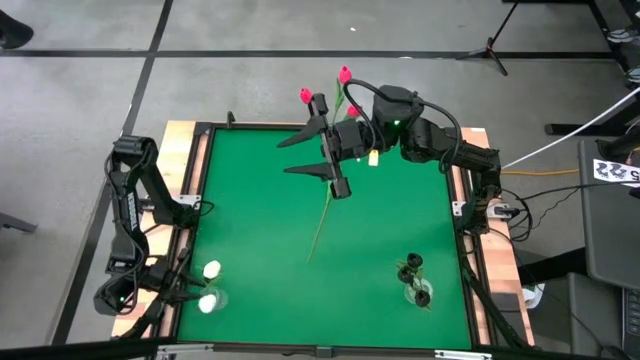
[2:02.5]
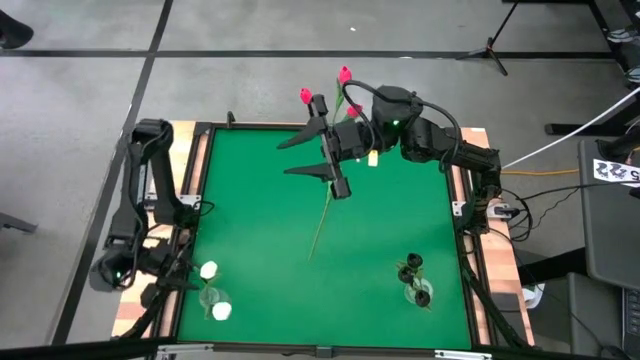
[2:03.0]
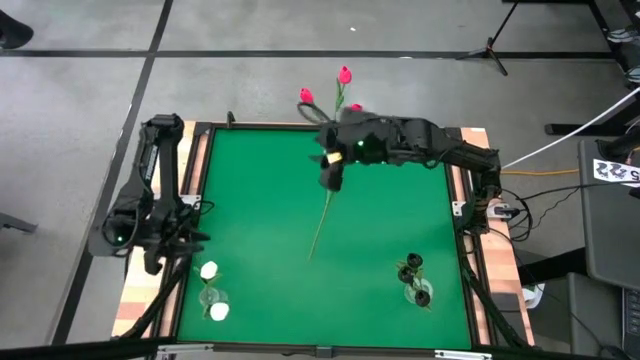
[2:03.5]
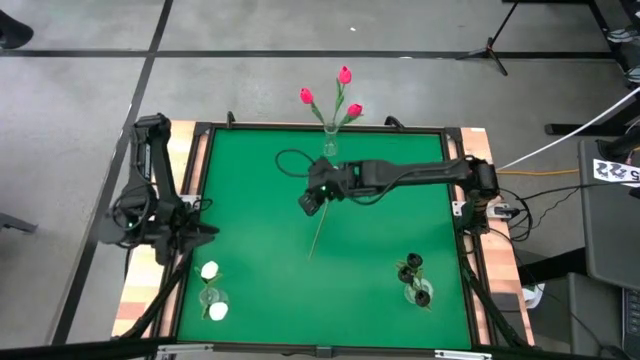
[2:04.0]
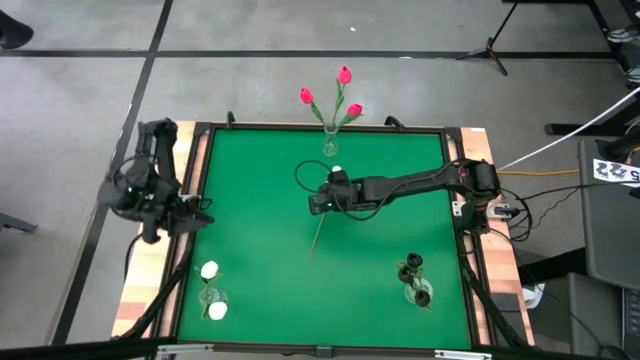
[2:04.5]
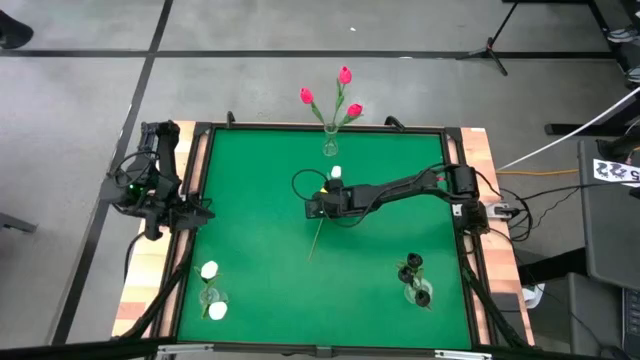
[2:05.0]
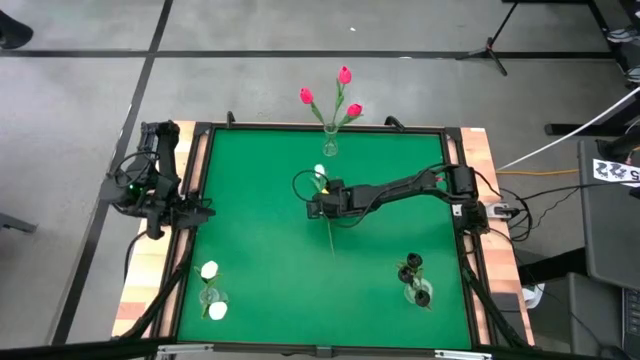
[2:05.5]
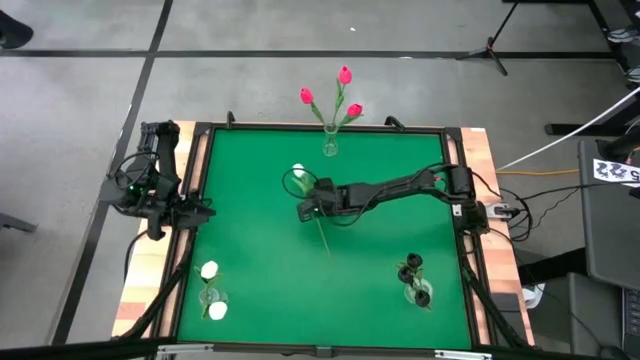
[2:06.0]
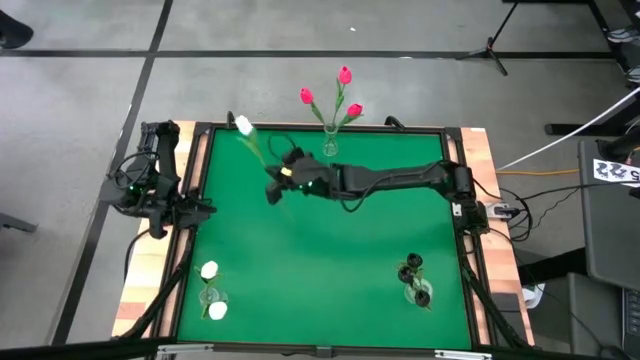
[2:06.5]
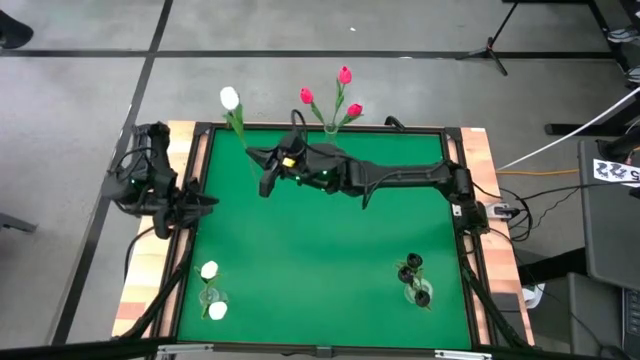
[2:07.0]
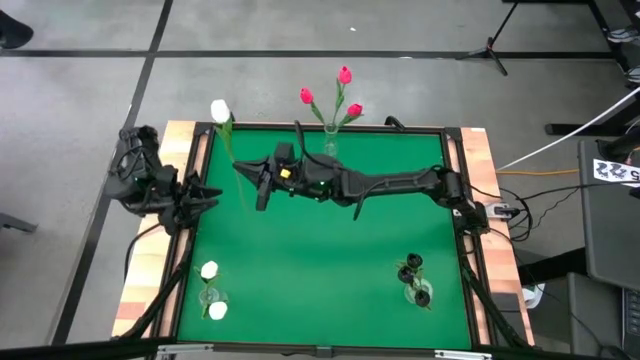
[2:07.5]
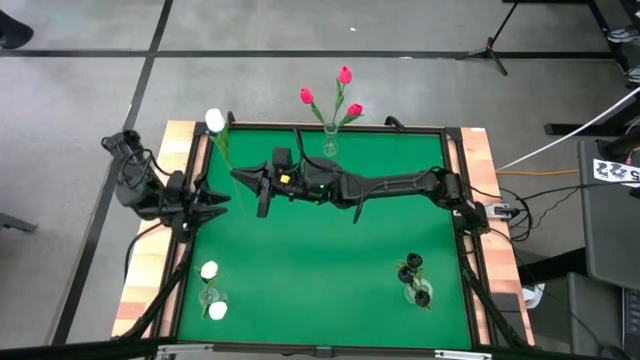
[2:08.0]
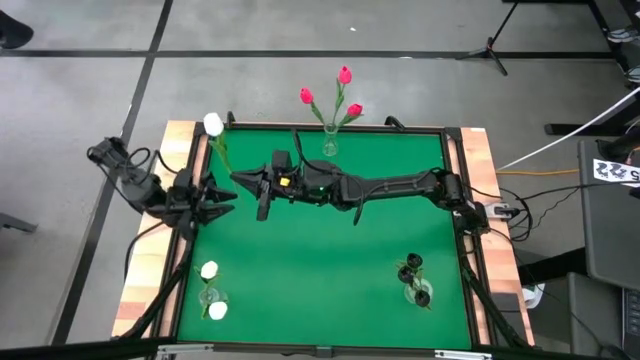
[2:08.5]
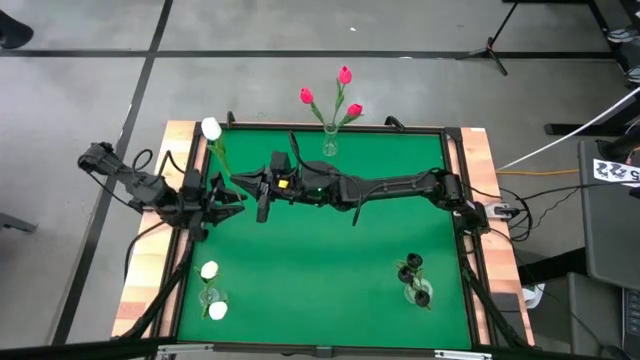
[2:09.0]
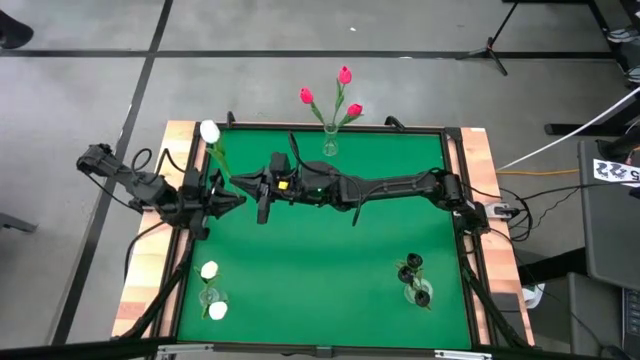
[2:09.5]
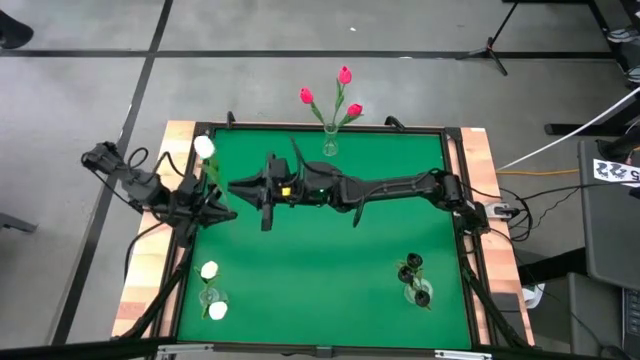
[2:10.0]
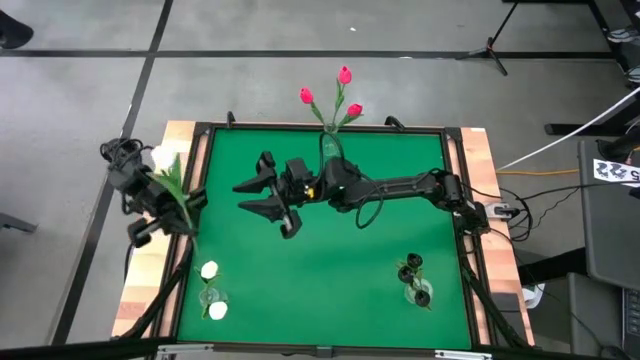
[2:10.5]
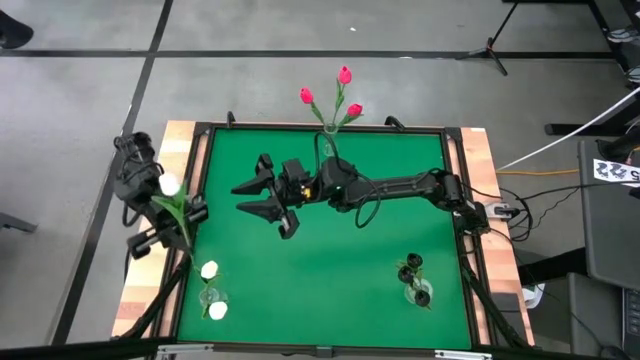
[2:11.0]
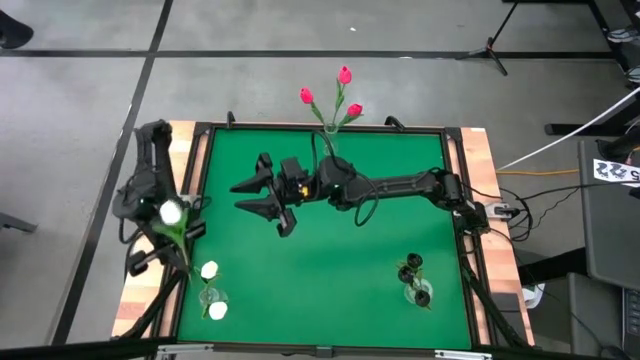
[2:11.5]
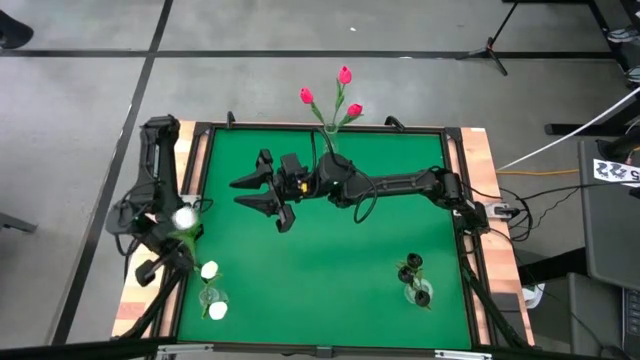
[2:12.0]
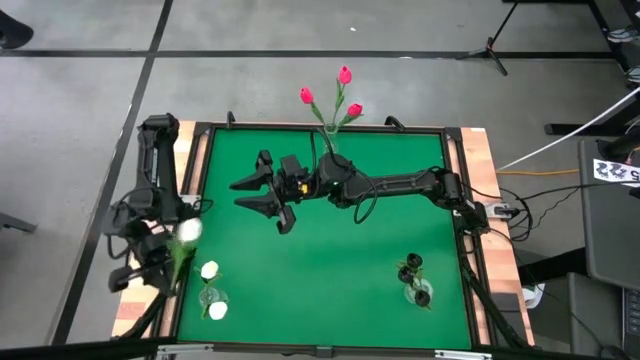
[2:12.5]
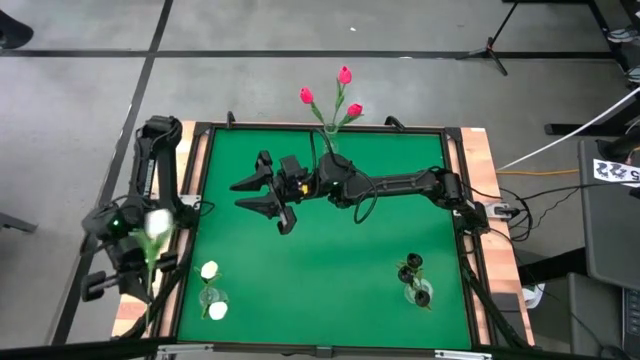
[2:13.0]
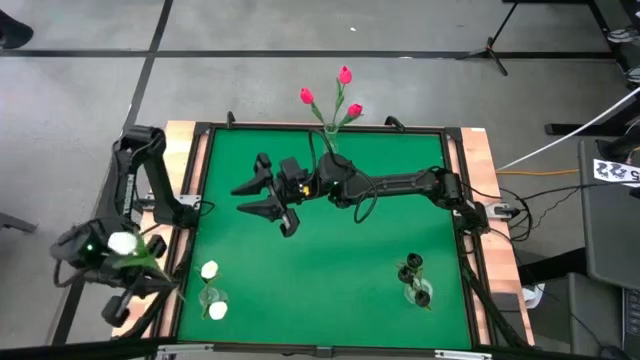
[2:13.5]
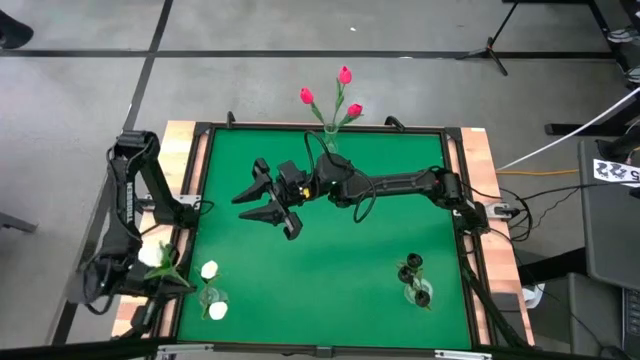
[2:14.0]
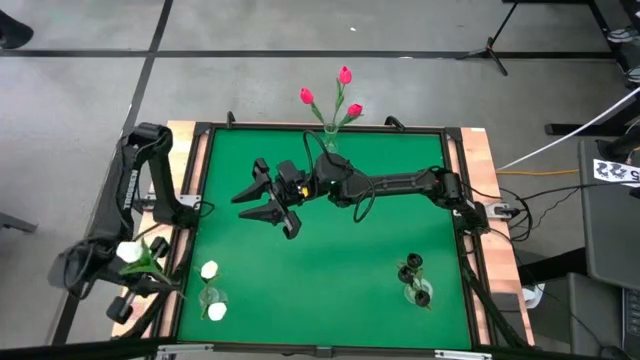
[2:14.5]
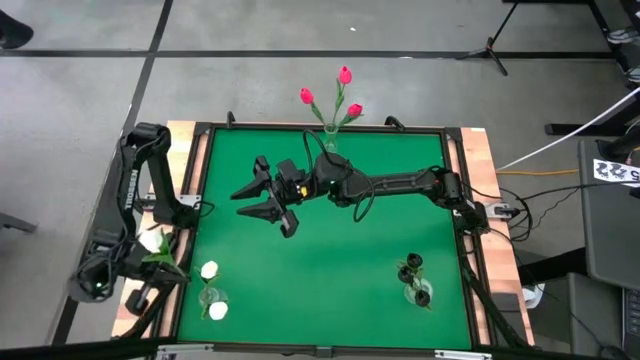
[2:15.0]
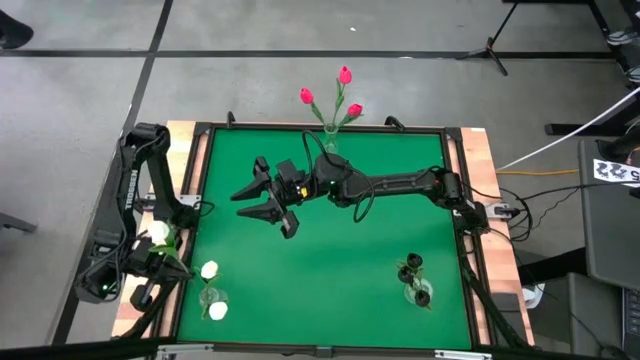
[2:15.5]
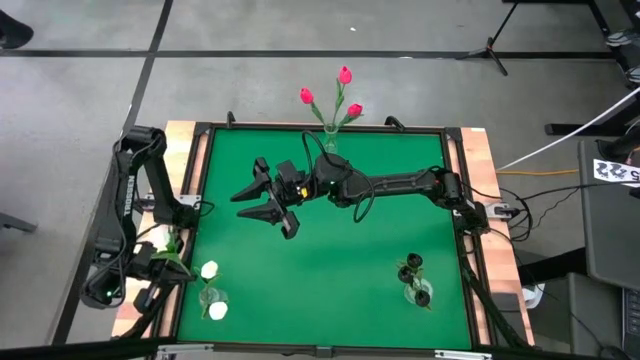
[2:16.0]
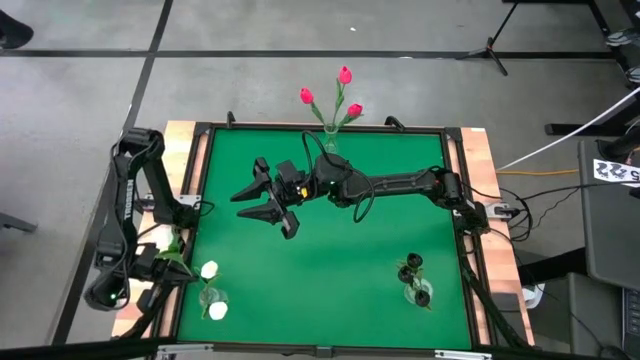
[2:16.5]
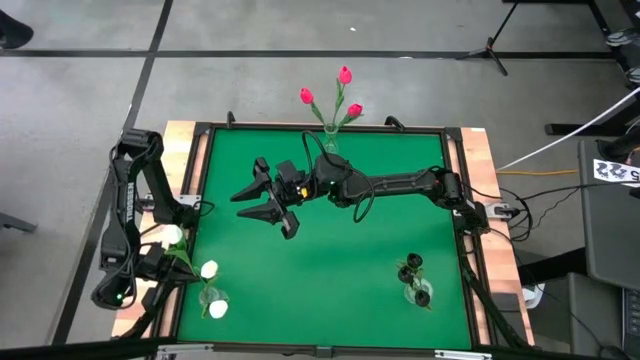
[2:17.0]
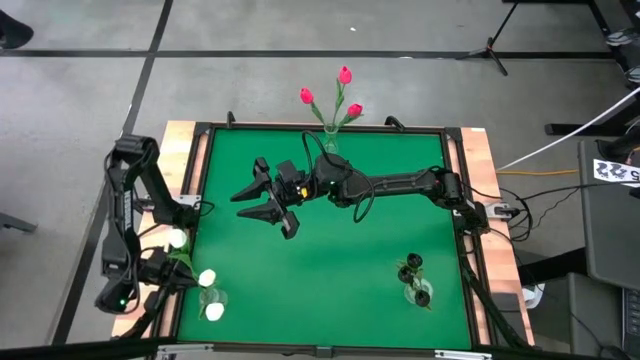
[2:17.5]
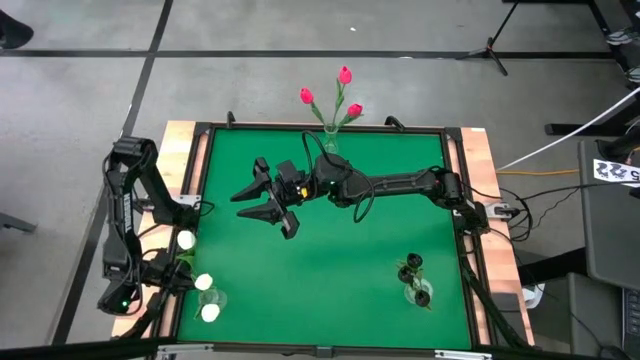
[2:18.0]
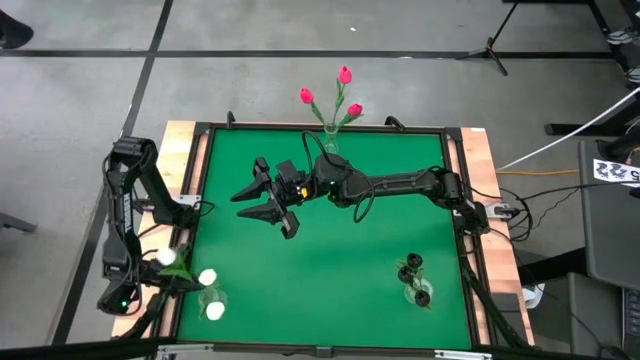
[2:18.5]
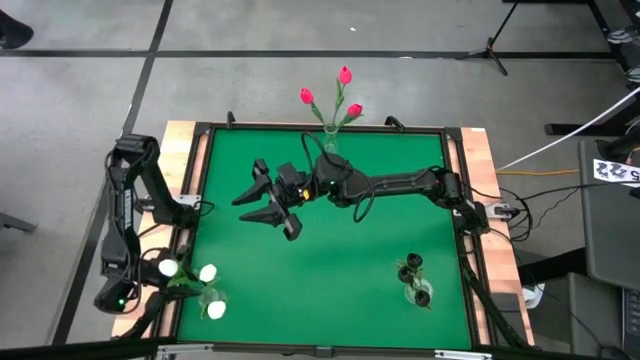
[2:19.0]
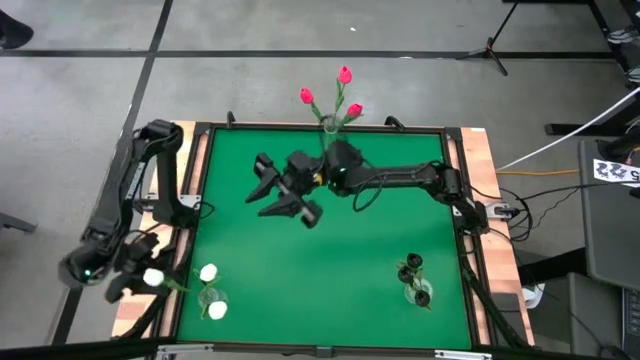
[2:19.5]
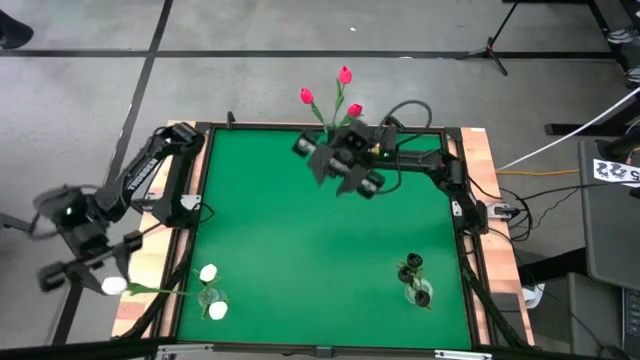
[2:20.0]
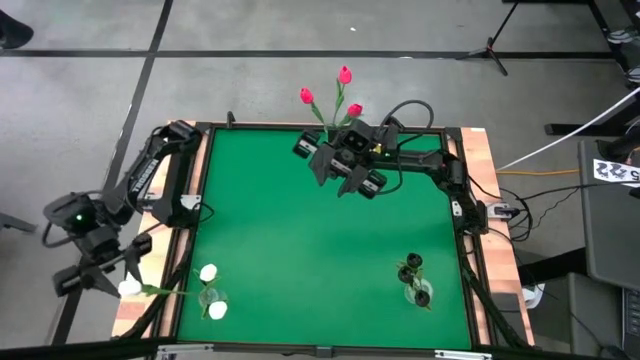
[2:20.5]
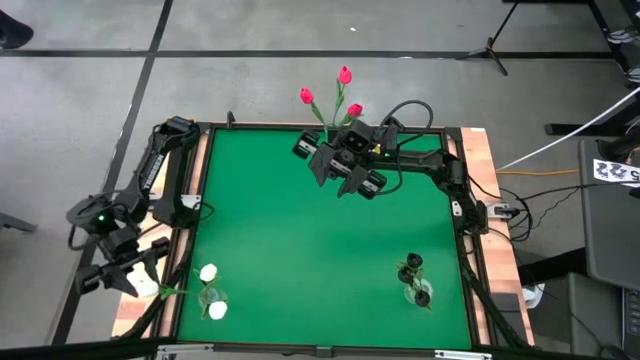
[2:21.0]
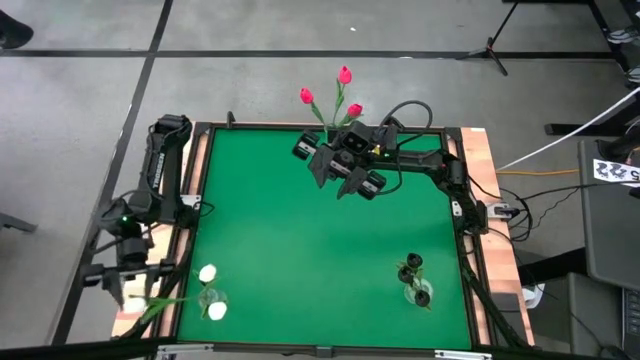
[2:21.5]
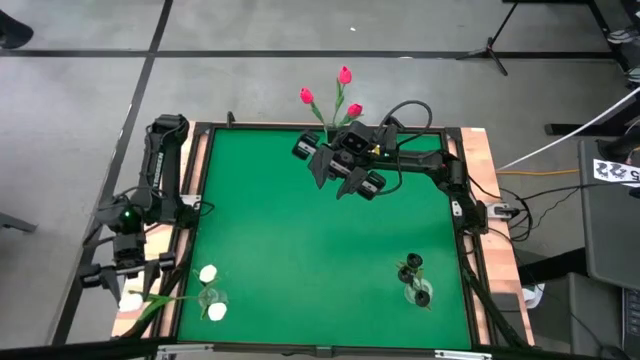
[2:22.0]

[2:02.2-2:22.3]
Task: Sort flowers into vase by color
Put the white tulip into the bottom left transparent vase
